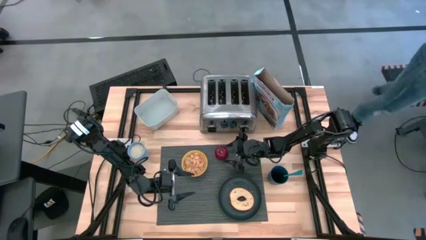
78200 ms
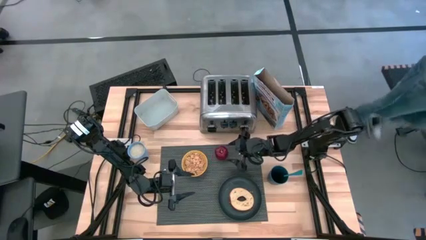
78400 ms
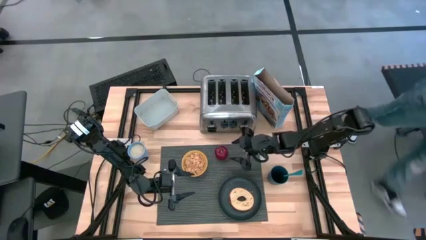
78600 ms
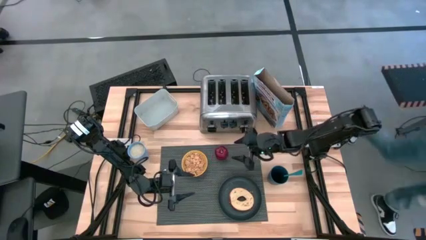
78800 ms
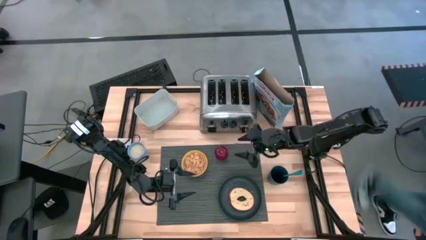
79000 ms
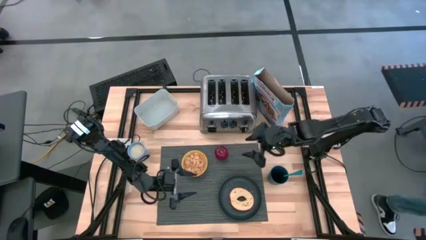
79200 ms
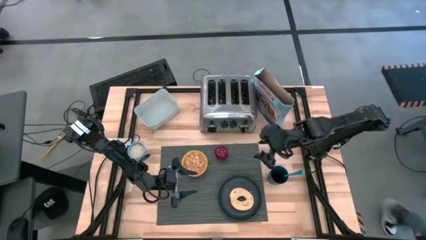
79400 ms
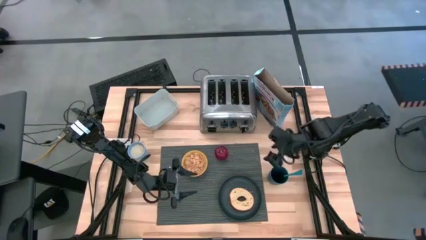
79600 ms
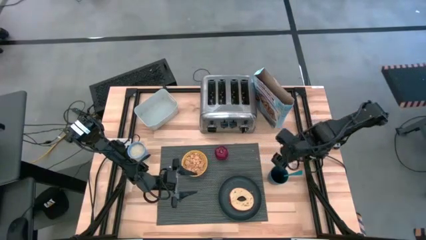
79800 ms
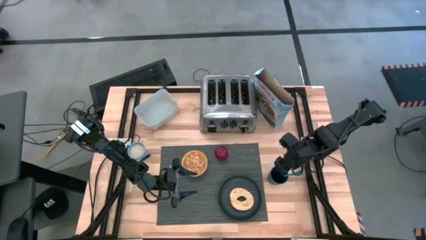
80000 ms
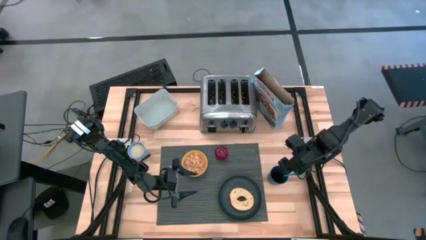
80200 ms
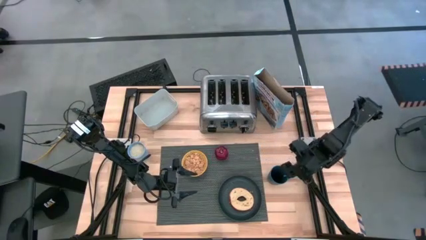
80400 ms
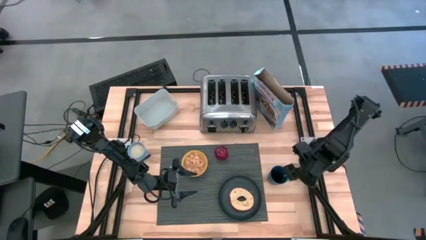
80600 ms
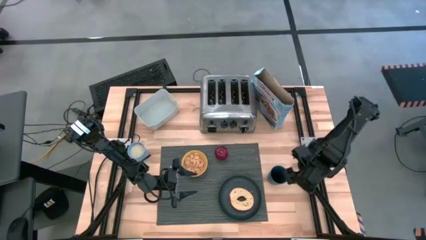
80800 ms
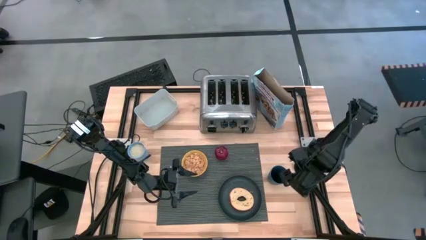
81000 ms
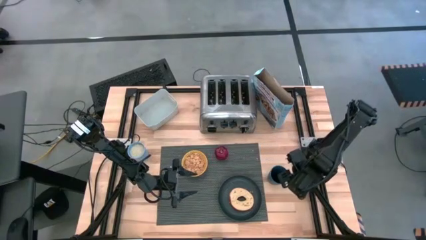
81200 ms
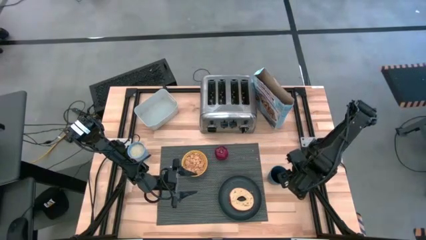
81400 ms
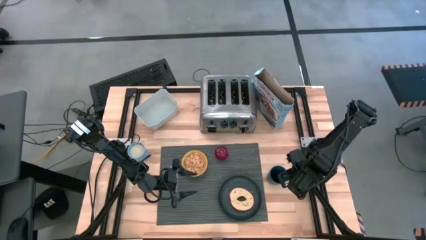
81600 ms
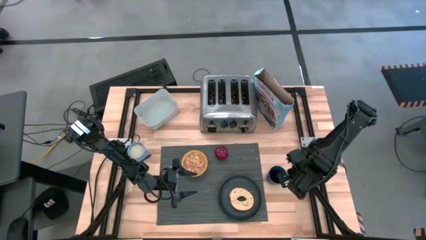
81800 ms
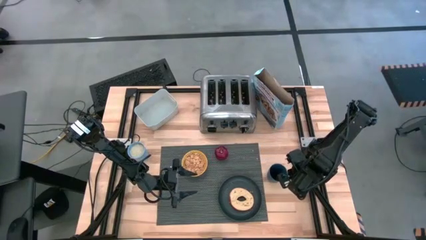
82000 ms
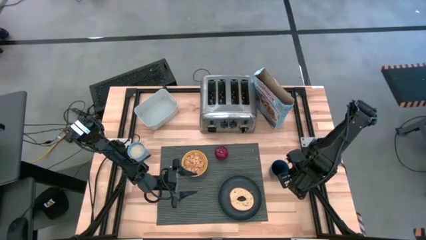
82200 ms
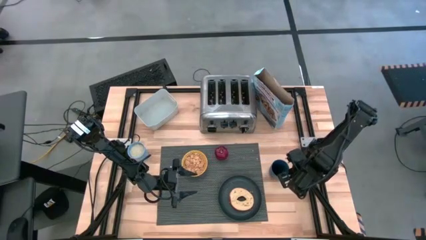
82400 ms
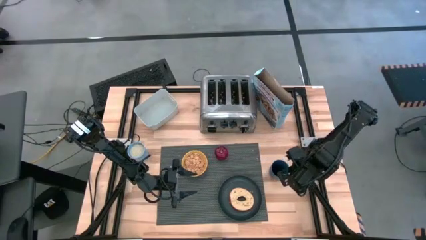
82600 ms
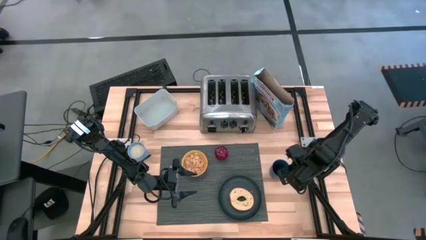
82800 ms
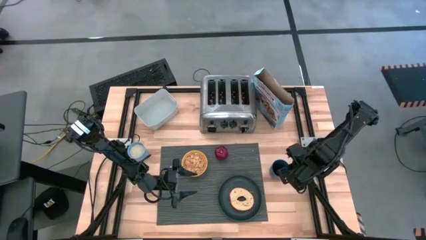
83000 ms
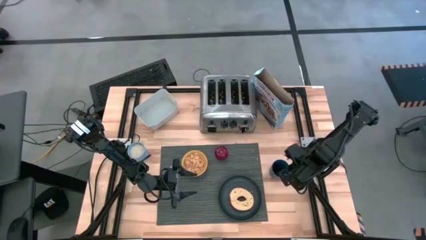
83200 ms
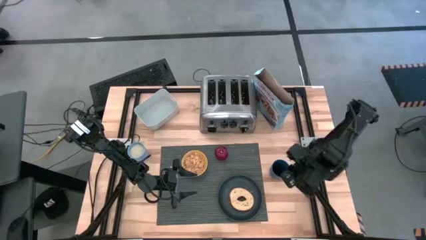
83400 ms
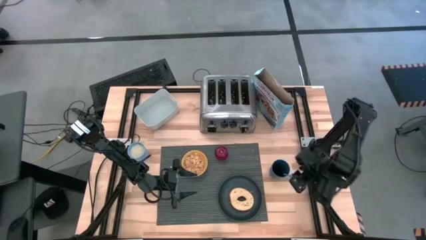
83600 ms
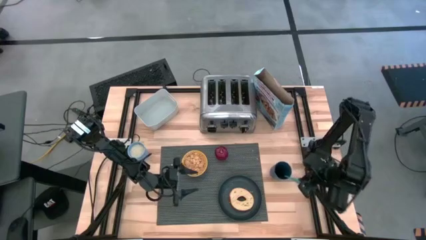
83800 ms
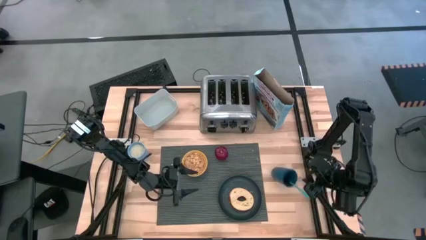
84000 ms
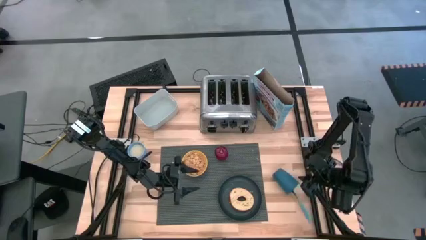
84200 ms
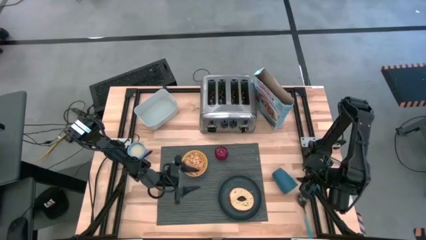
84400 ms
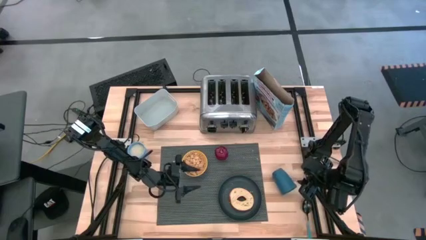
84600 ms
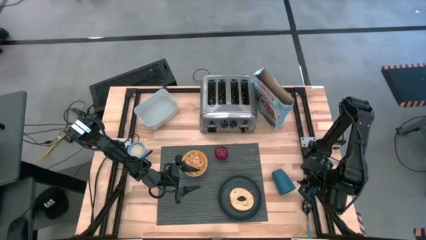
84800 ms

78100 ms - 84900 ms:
Task: Arrange a breakfast setting
Put the blue spoon on the black table mat to the left of the yellow bowl

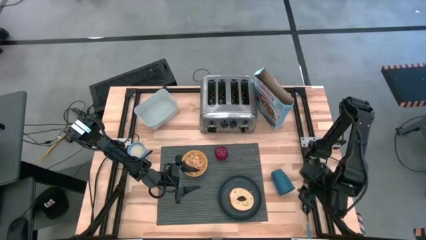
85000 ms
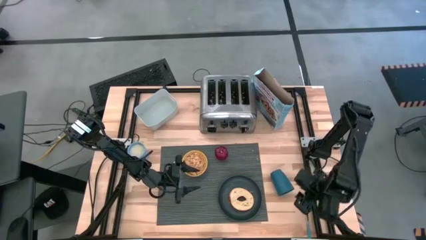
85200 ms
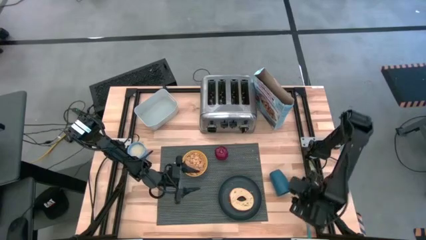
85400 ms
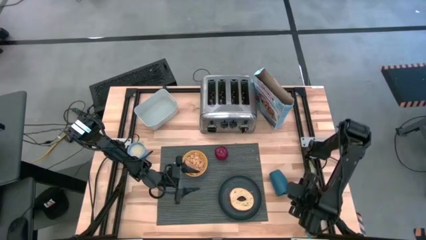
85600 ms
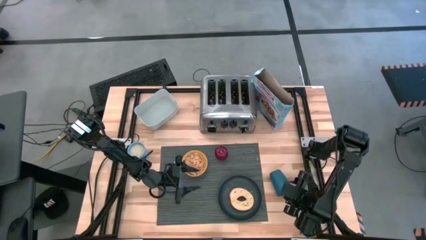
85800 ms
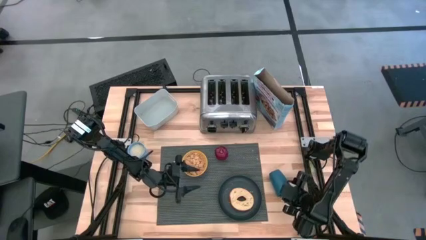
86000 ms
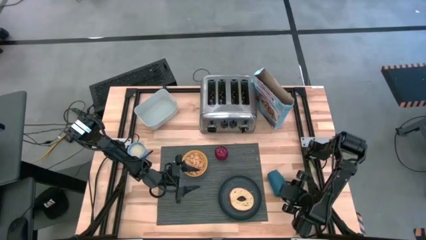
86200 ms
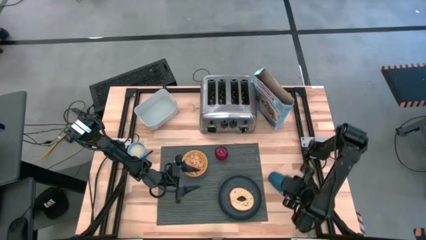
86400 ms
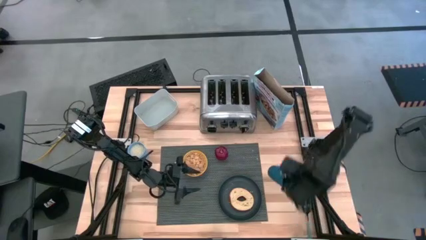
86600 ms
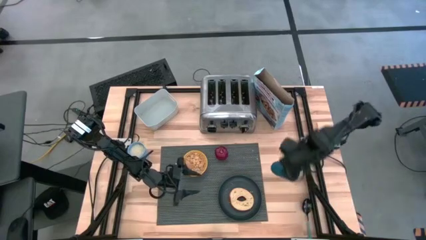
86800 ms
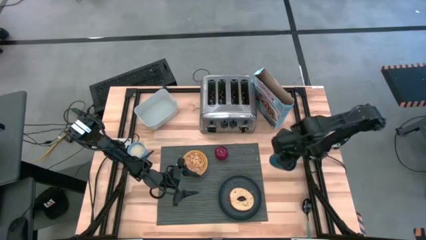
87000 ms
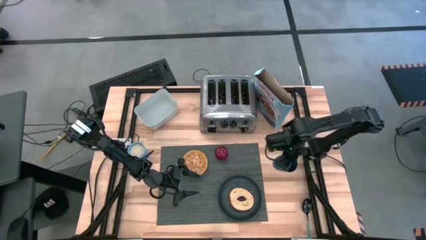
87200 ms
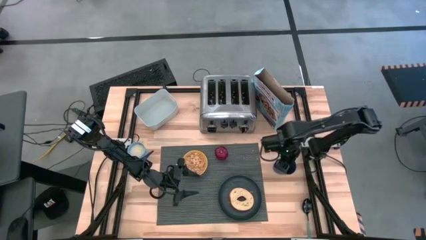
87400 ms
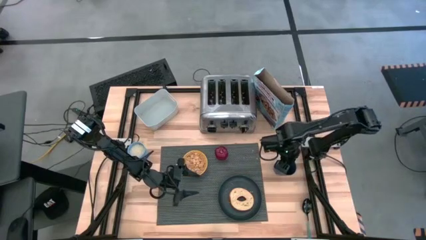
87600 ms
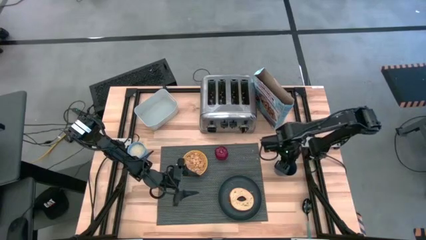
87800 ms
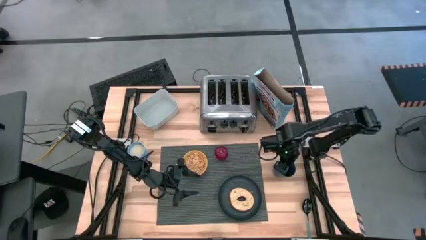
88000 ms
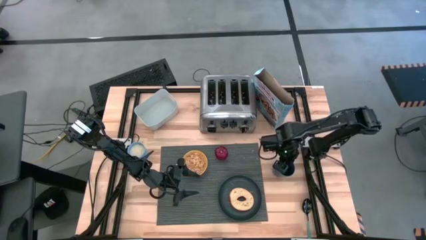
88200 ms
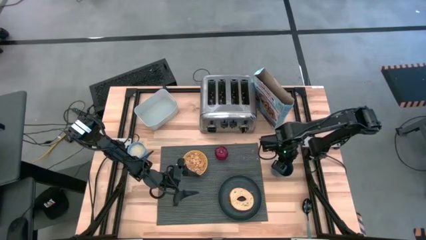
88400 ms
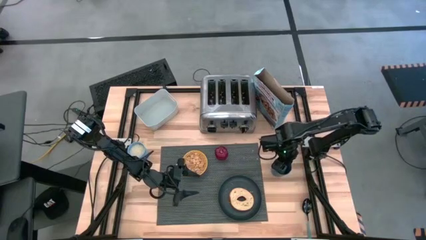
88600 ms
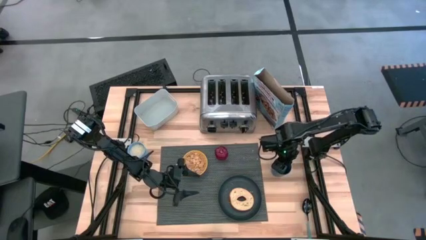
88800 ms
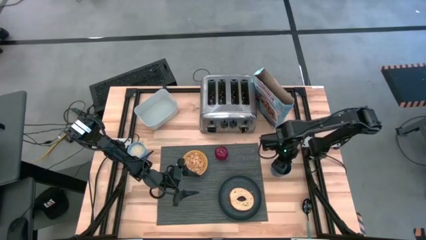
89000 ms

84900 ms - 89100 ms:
Adjust the blue cup

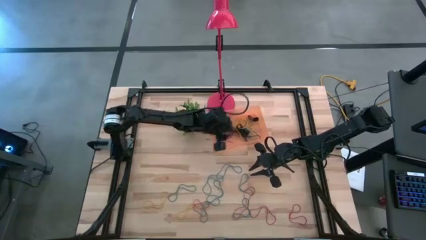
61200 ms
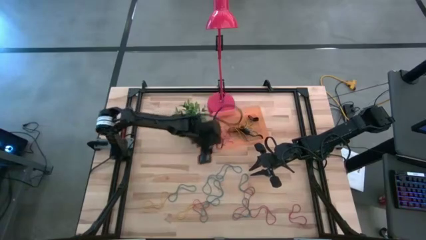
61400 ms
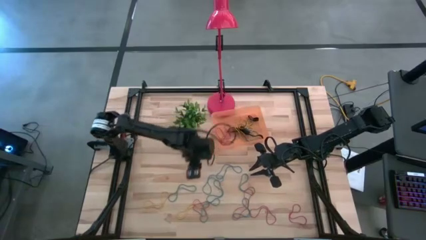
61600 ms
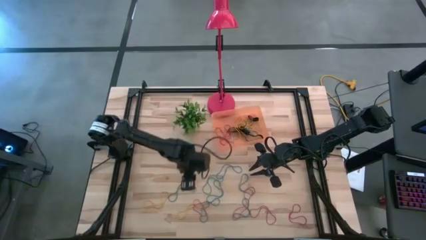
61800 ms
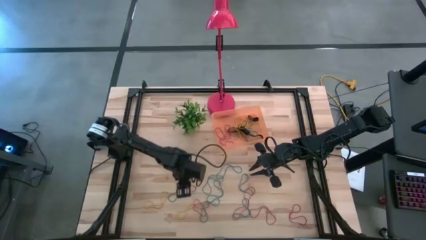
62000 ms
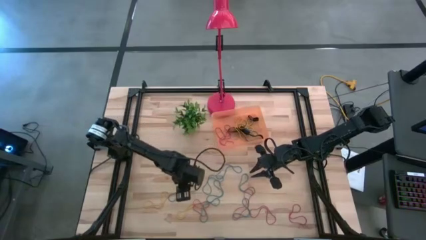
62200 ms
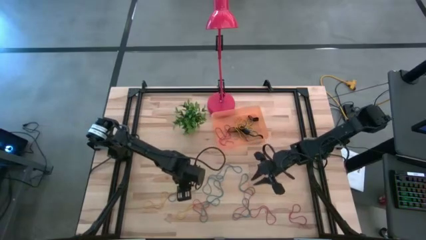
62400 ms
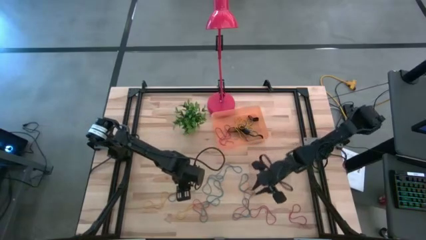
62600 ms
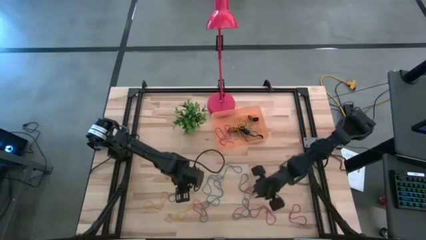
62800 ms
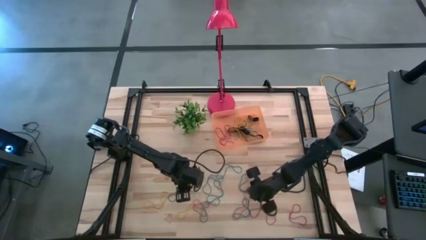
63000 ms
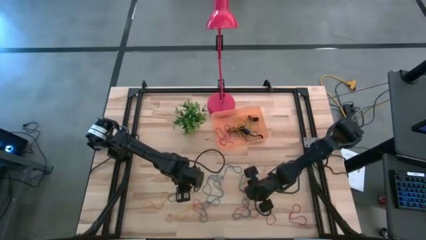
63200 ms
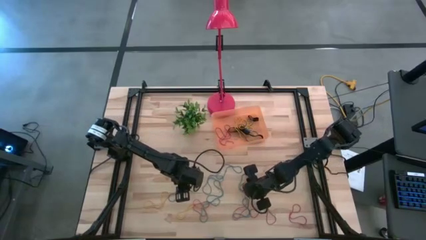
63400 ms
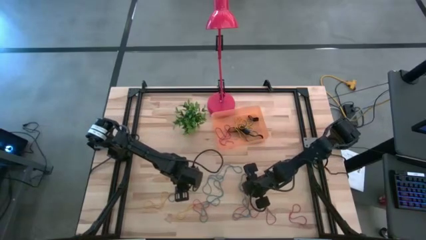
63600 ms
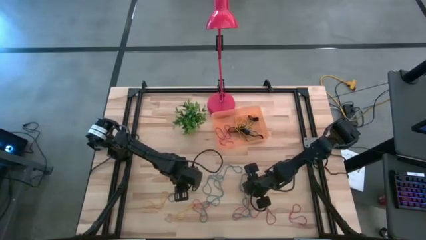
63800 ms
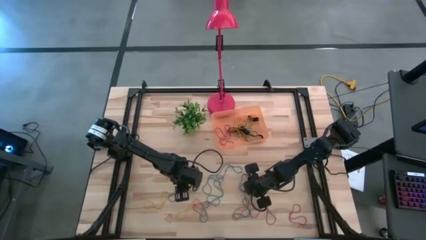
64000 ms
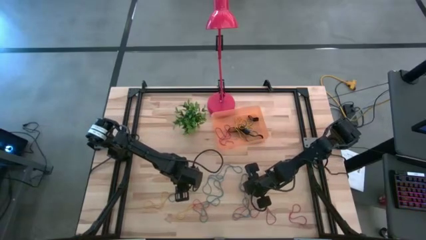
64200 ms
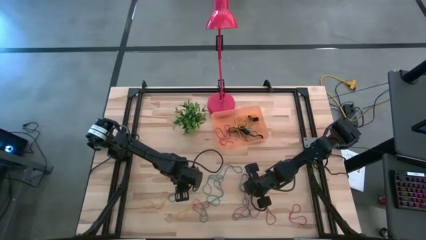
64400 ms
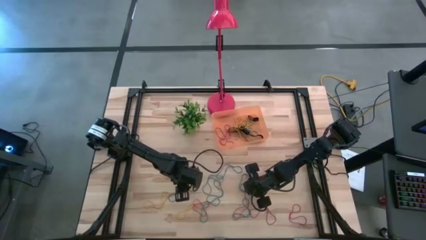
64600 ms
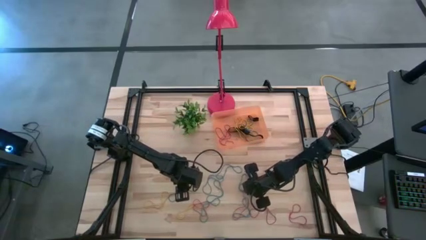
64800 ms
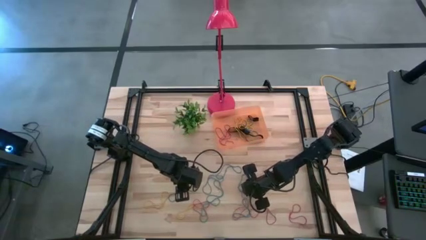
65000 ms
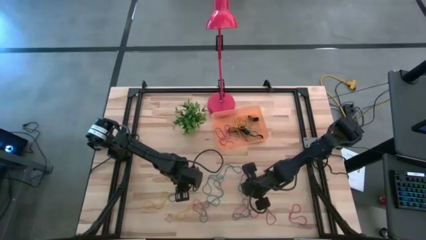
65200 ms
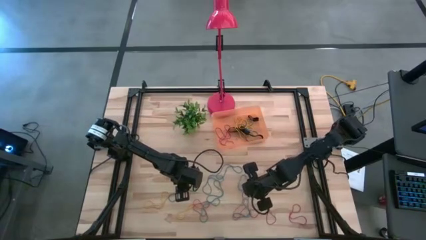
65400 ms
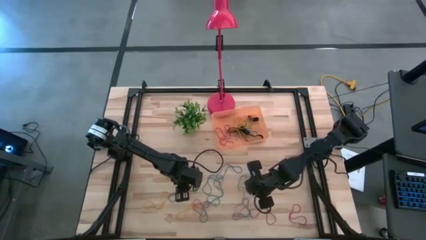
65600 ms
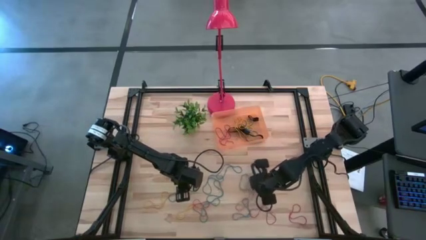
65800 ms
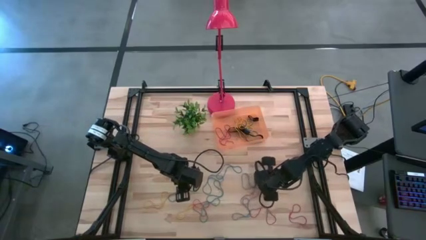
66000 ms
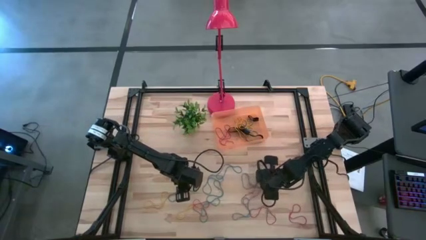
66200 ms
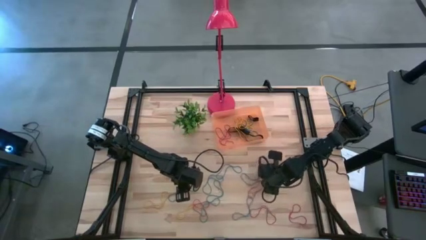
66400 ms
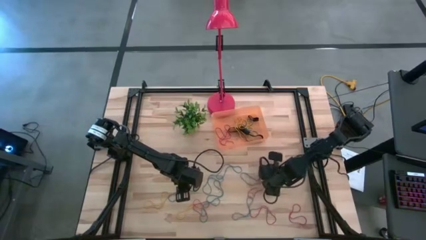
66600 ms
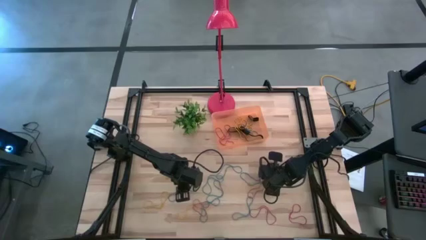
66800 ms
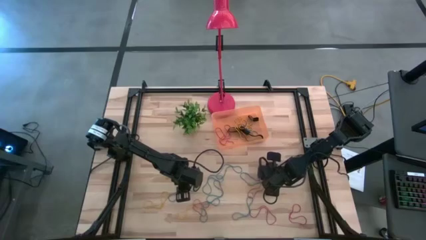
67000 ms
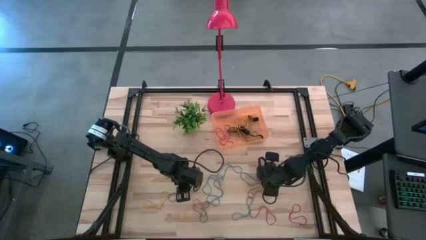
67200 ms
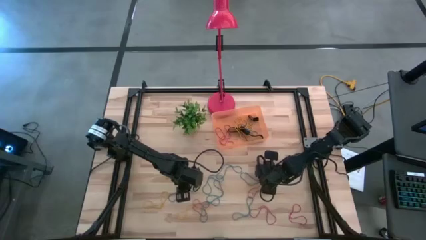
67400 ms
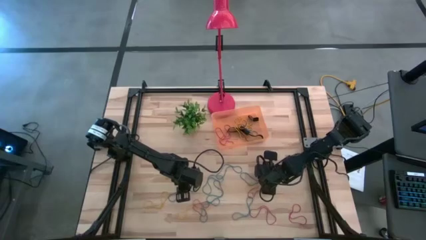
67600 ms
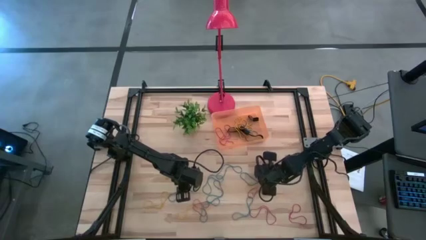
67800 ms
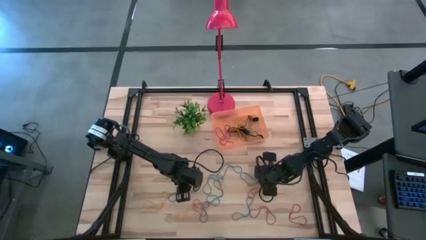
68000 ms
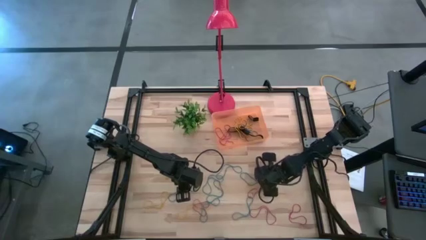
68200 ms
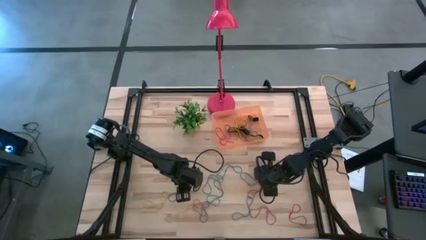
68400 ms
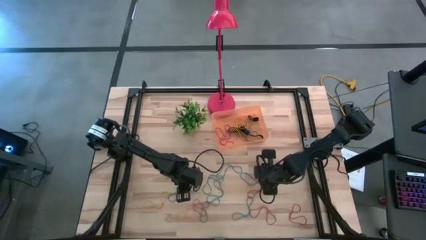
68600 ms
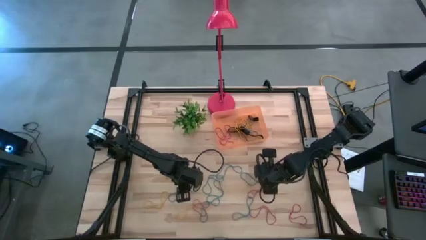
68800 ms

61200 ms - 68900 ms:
Task: Pick and place rubber bands into bin
Put the red rubber band into the orange bin
